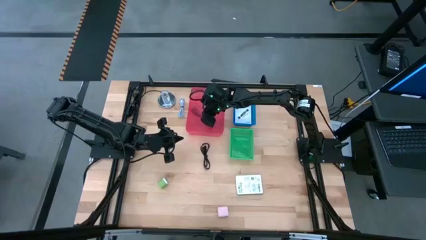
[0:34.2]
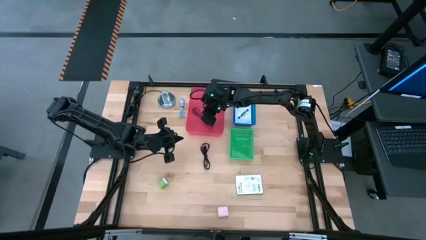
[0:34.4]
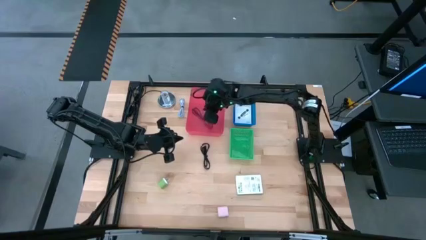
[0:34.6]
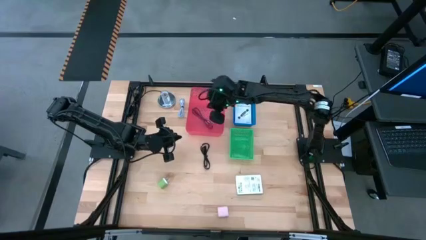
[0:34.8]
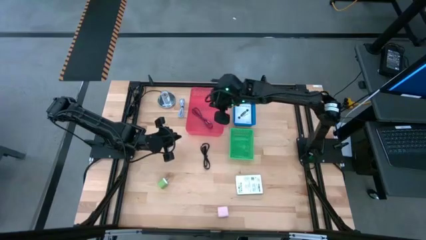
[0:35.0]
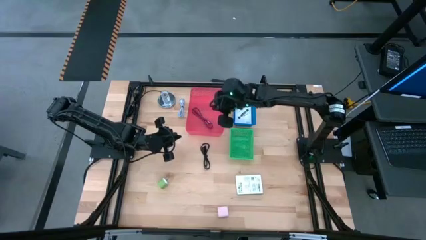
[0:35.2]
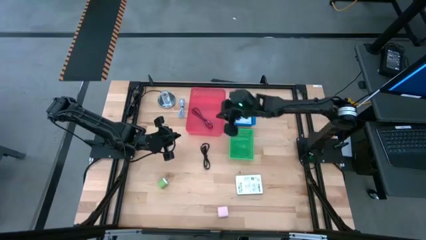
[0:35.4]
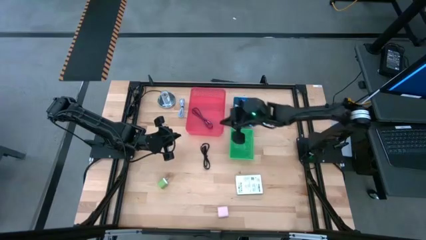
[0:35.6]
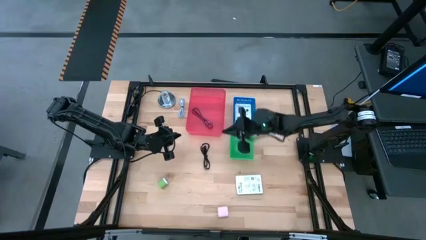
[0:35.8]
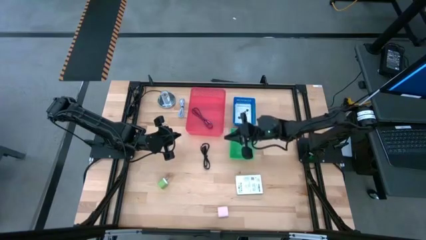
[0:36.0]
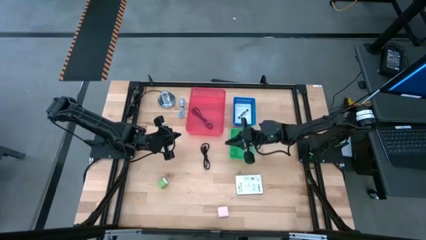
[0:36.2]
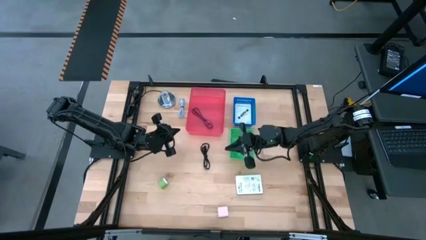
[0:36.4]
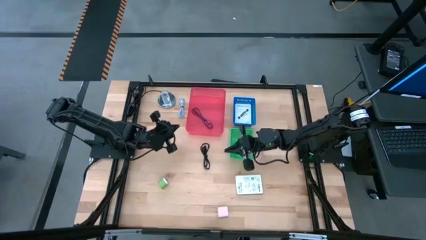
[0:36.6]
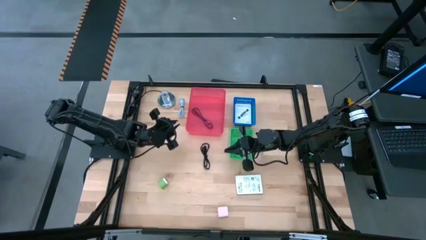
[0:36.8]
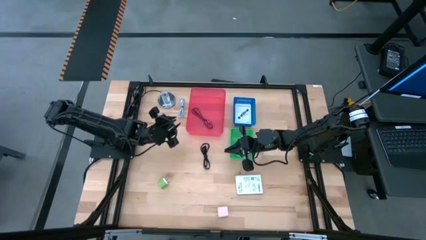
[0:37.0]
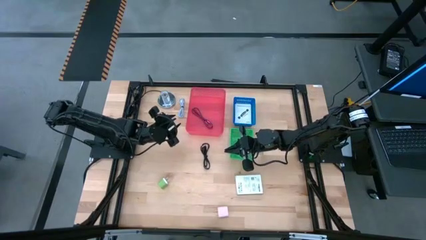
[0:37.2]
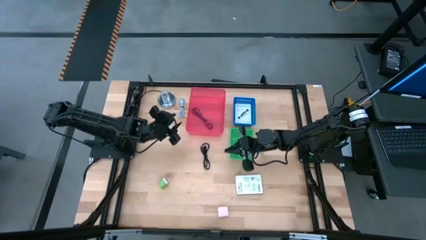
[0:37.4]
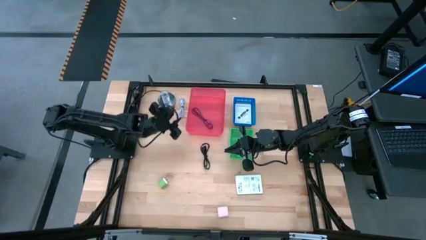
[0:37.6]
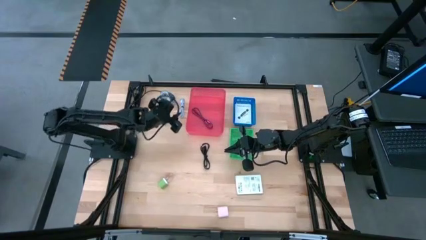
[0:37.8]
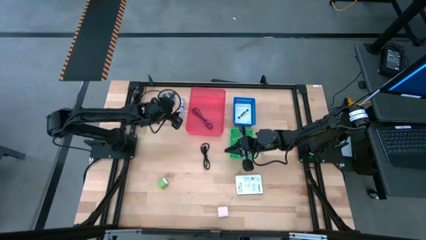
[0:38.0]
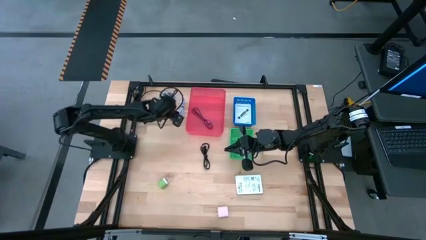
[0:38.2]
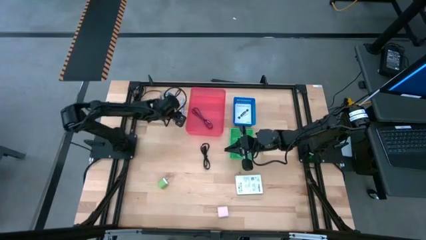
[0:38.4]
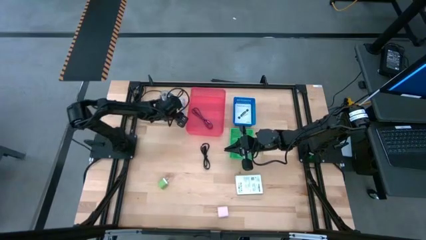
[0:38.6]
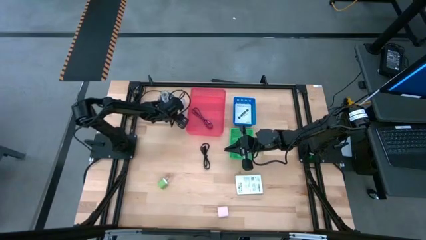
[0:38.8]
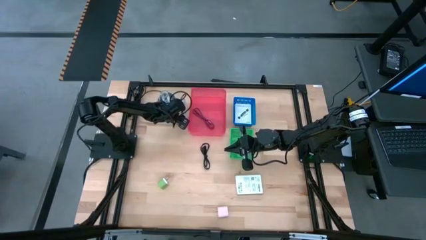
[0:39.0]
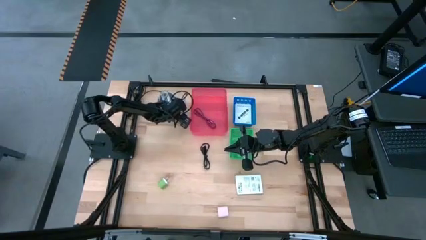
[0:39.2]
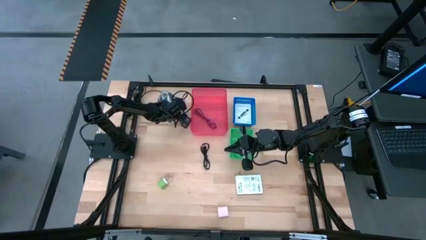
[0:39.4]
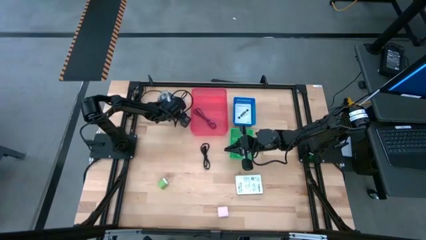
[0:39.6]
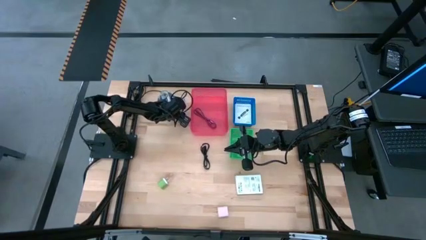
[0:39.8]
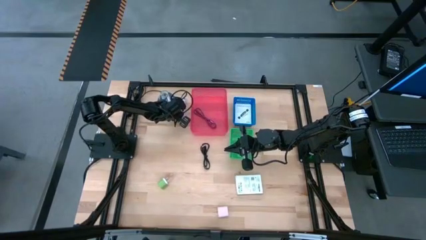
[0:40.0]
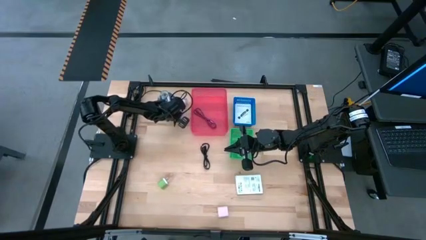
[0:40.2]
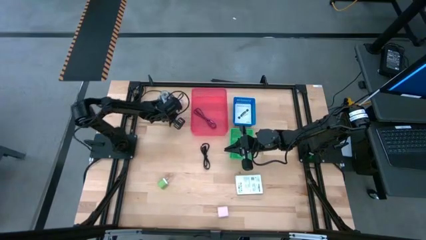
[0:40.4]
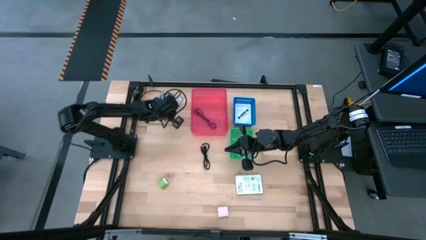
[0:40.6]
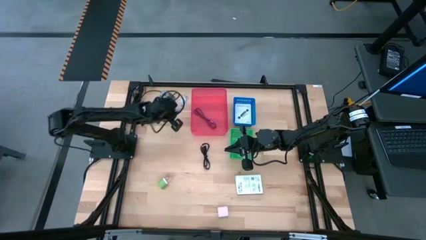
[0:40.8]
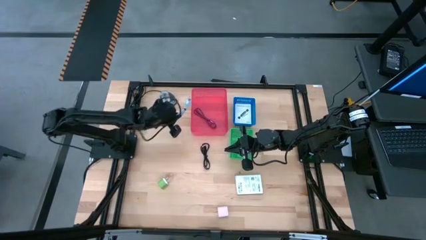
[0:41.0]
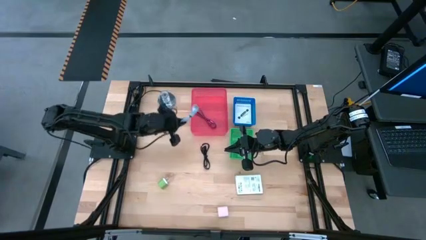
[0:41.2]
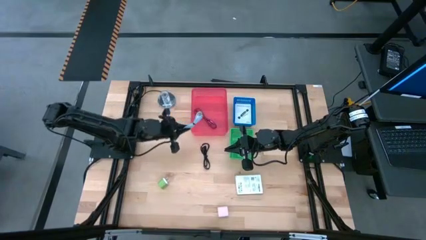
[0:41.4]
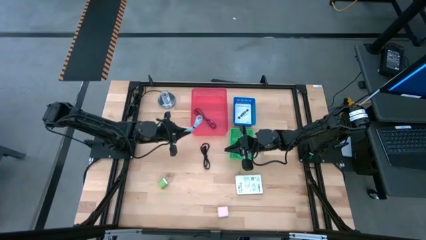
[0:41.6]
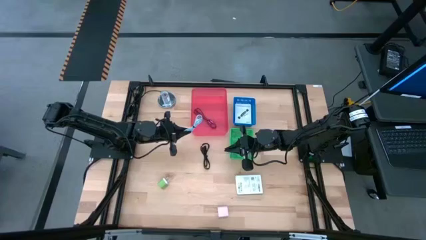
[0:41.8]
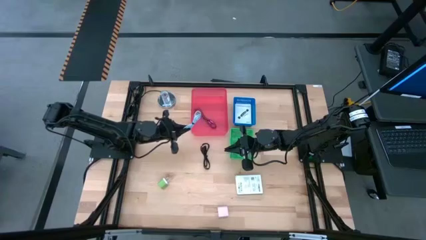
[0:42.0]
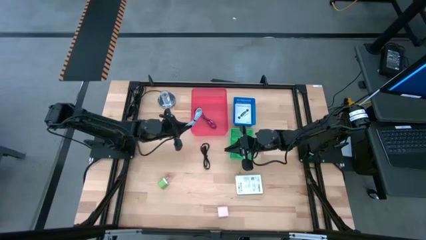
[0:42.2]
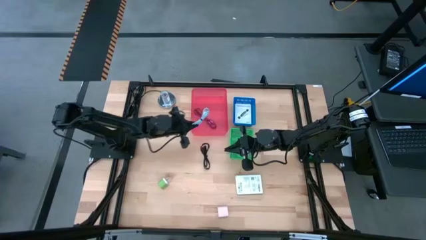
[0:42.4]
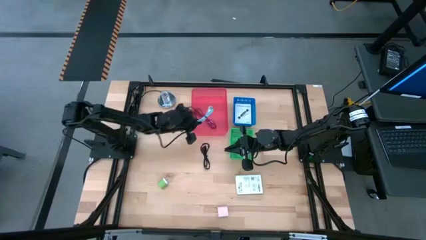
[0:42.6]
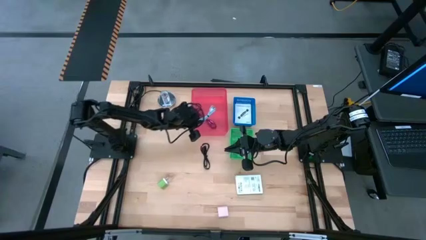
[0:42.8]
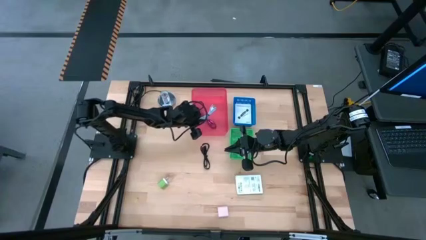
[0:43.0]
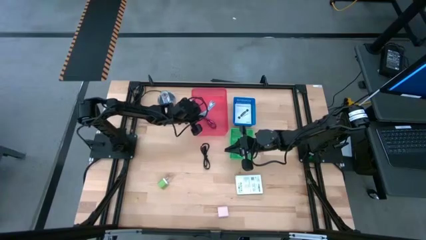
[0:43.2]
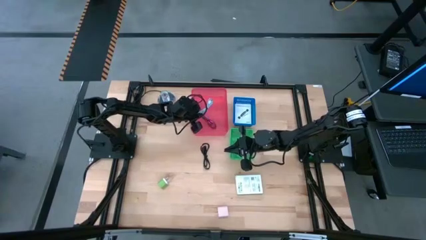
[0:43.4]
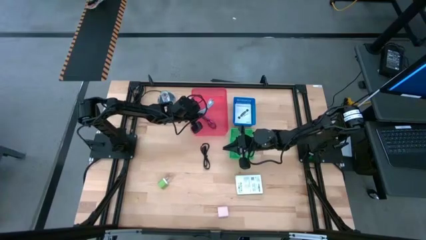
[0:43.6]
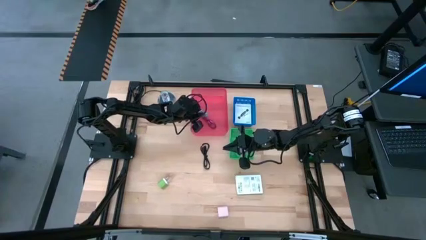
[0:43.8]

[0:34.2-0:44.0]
Task: Pick and place items into bin
Put the white USB cable into the red bin
